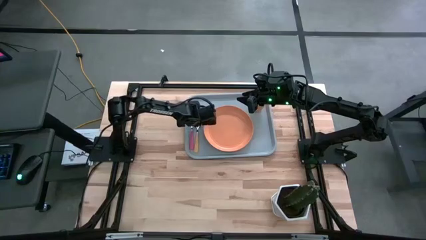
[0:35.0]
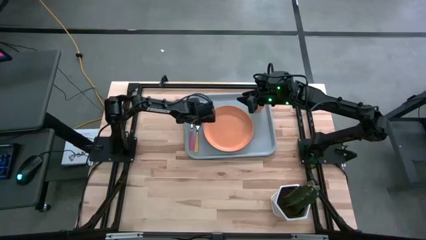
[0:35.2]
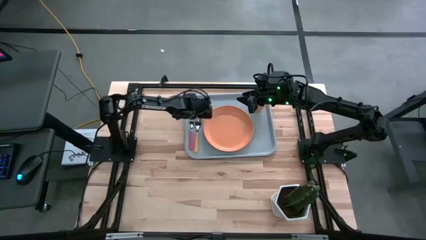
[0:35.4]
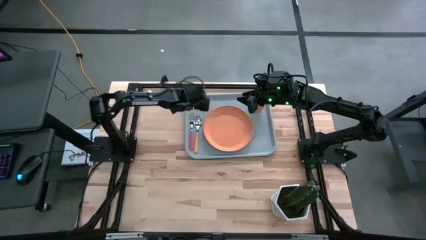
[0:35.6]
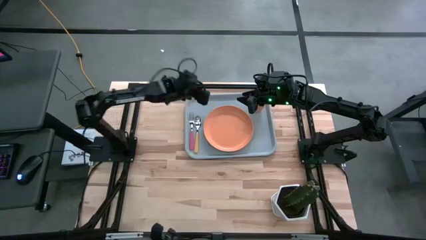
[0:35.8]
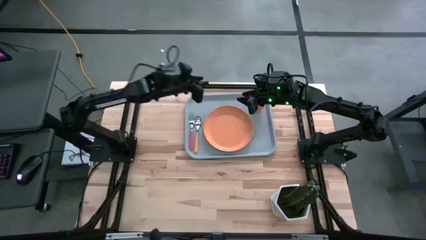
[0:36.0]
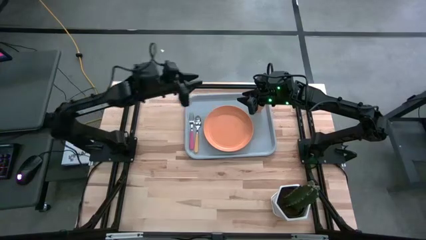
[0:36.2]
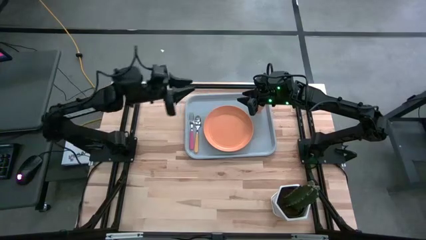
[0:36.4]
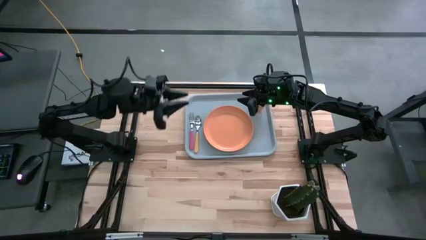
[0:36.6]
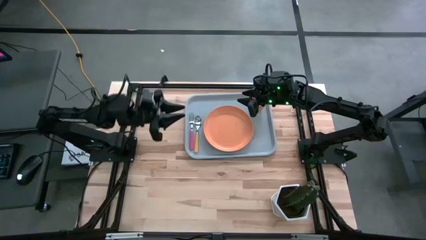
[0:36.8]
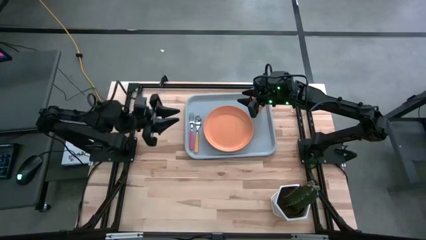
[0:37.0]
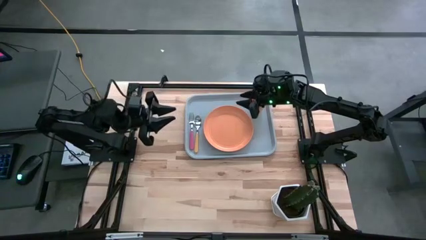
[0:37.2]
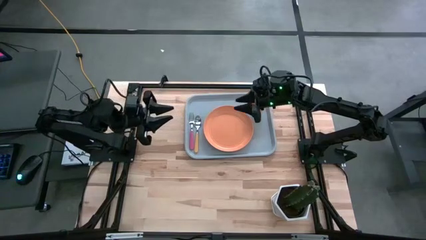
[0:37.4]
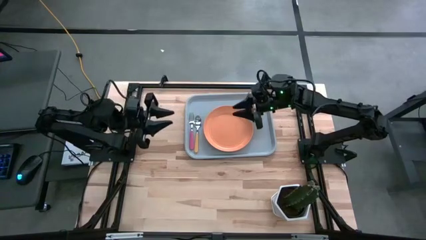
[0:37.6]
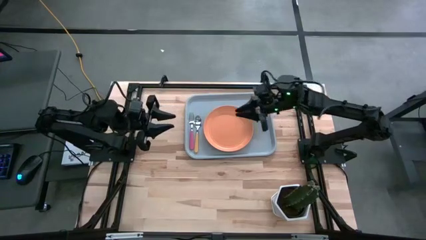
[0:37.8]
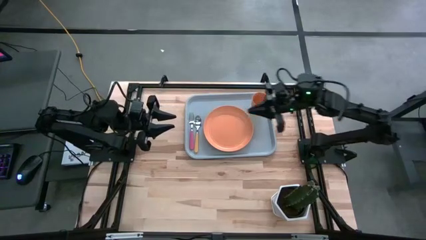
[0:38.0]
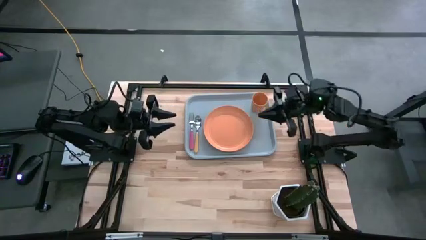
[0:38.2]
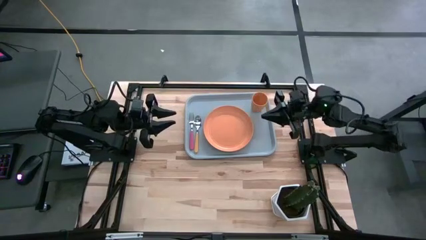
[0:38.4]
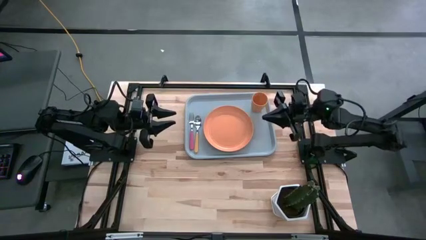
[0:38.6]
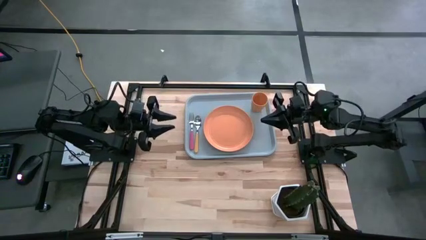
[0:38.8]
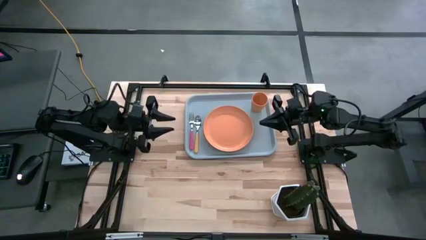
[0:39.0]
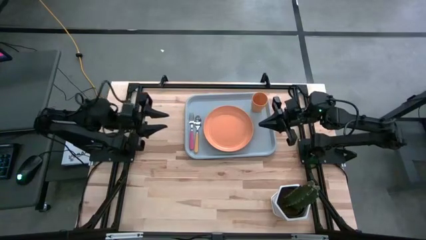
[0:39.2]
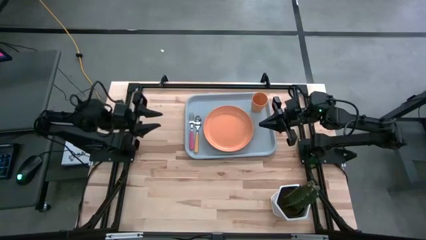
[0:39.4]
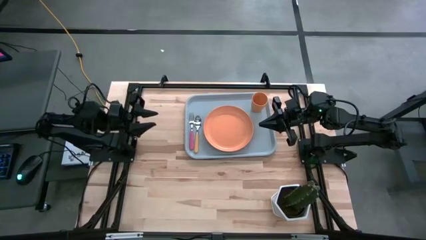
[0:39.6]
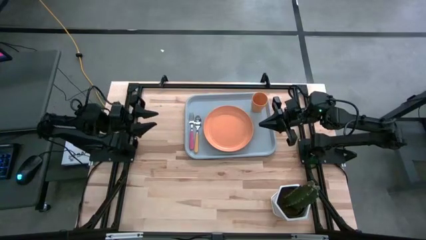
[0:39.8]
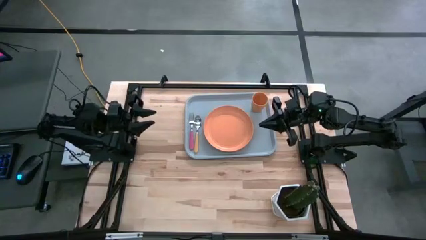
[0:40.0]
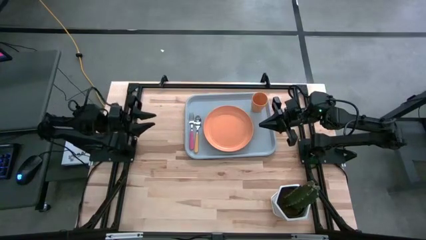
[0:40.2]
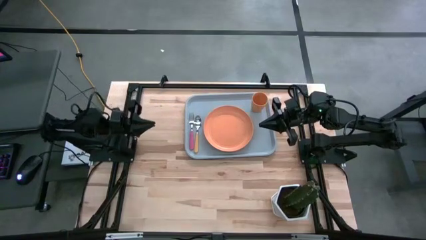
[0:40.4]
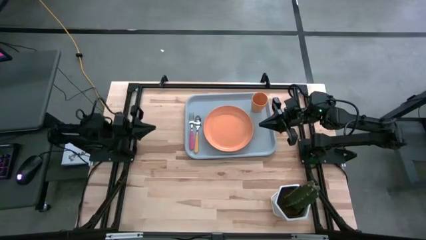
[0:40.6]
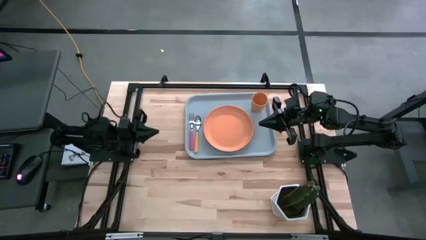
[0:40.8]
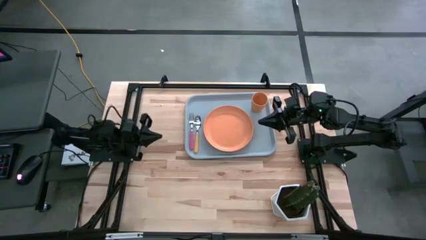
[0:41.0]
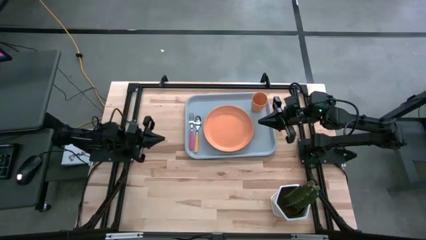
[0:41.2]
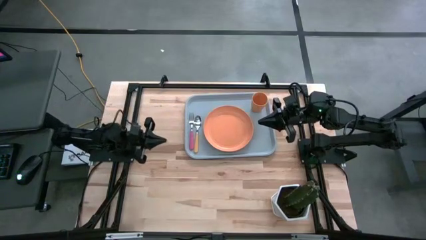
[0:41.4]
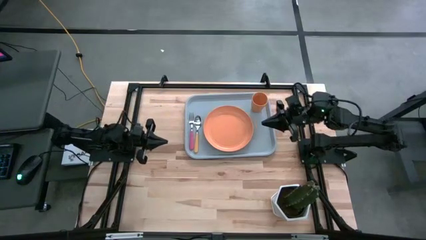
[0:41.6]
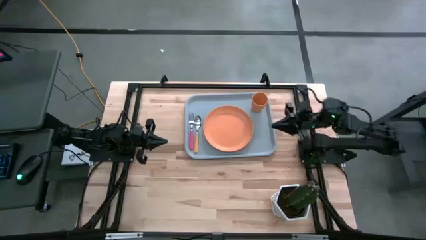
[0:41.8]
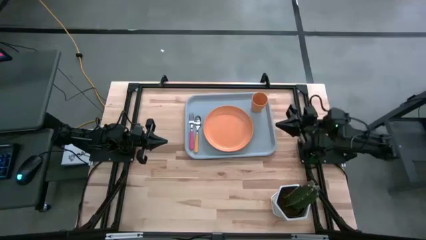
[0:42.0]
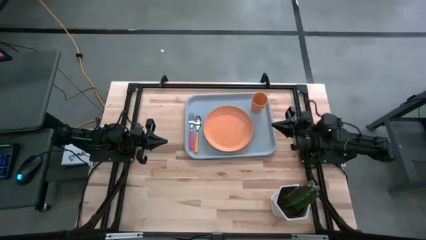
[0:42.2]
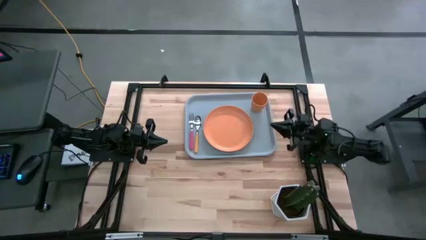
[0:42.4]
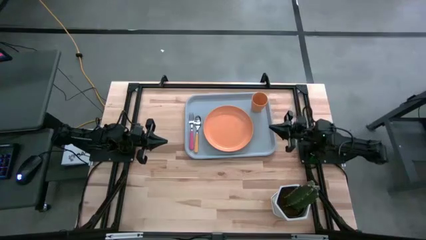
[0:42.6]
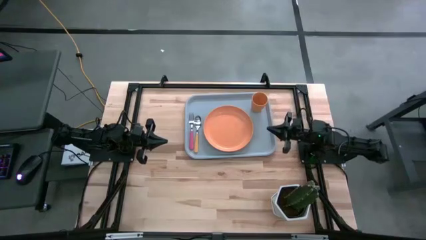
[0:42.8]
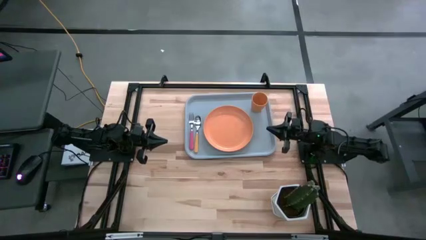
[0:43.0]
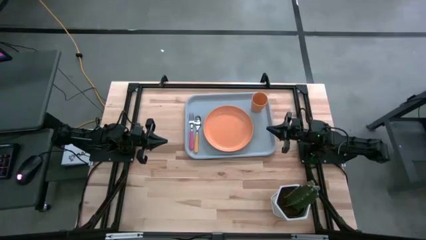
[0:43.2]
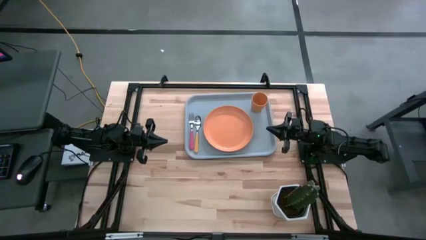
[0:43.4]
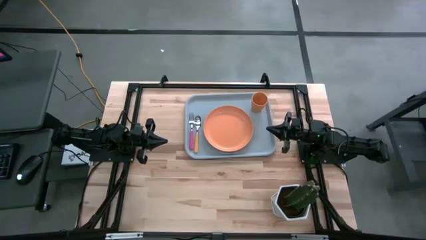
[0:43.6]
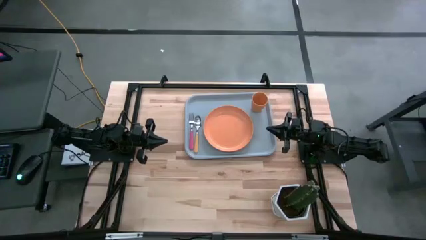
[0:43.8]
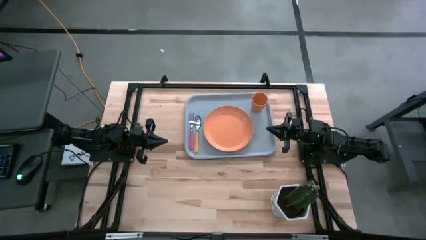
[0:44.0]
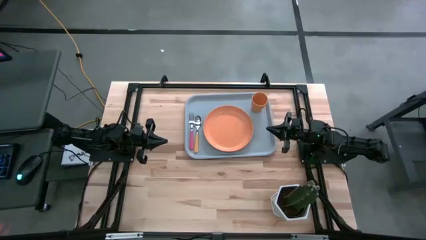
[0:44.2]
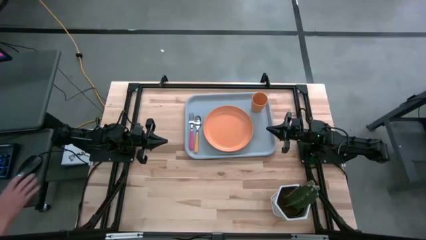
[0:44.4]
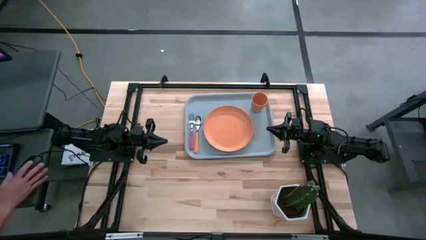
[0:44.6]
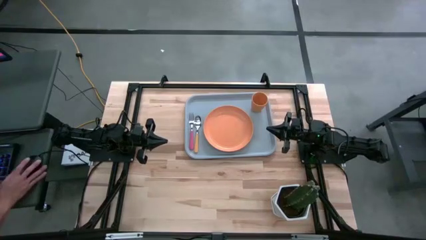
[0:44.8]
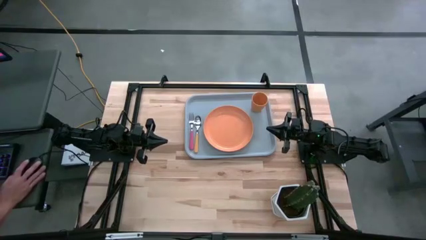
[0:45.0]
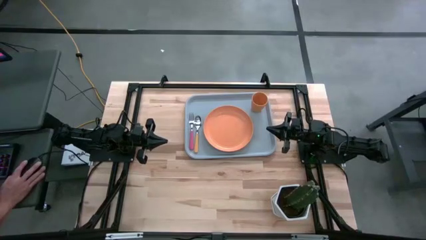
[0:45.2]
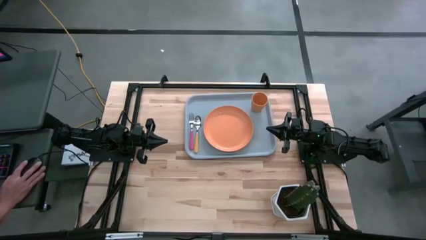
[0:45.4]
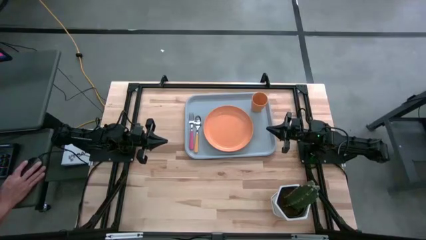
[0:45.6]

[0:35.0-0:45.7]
Task: Pick and place plate/cup/fork/spoon on tray
Return to Home Position
